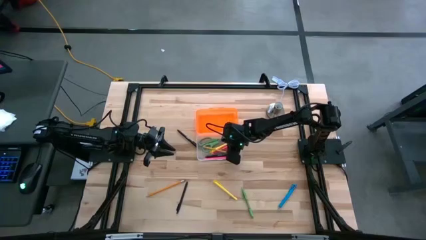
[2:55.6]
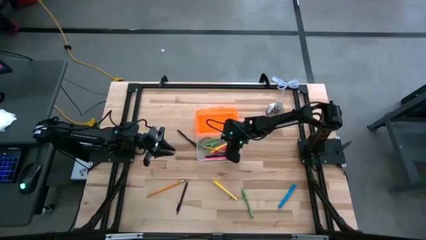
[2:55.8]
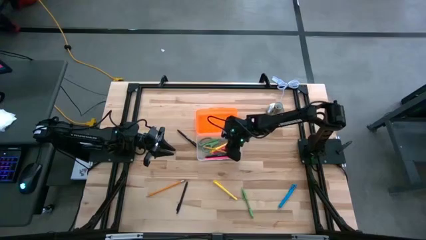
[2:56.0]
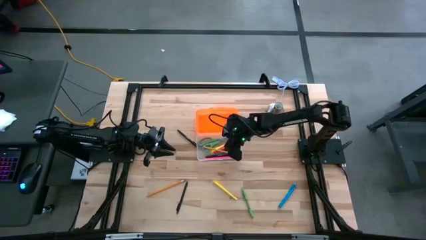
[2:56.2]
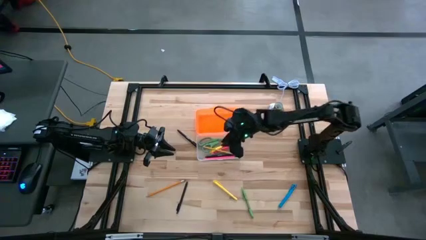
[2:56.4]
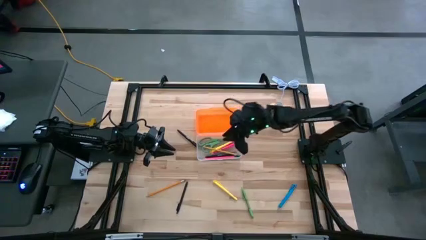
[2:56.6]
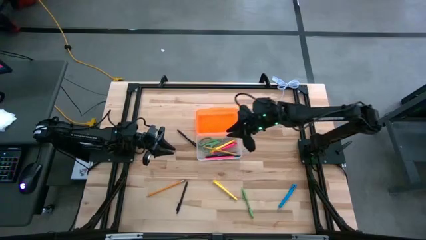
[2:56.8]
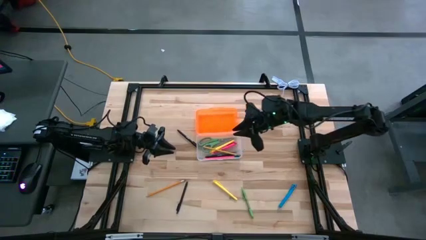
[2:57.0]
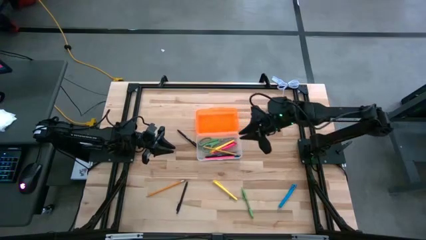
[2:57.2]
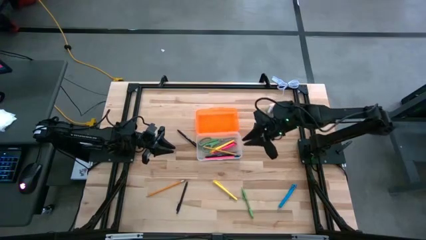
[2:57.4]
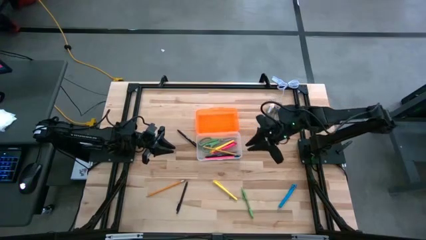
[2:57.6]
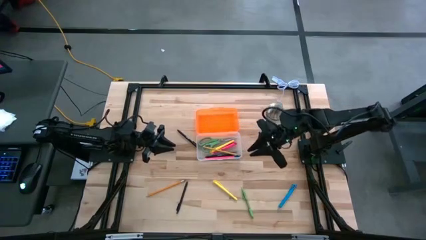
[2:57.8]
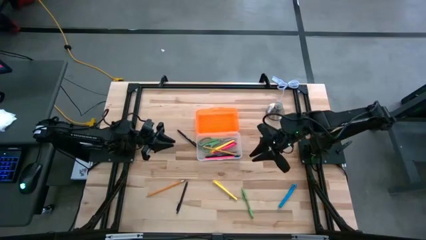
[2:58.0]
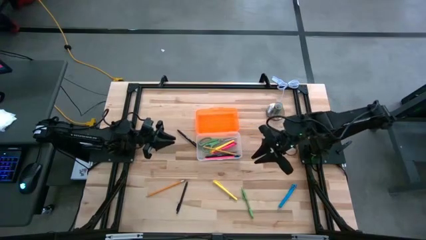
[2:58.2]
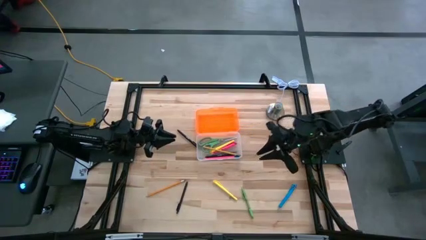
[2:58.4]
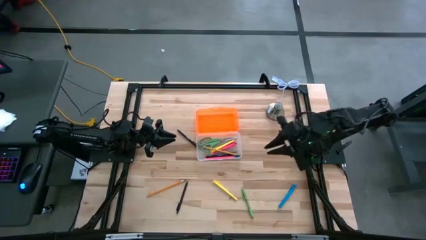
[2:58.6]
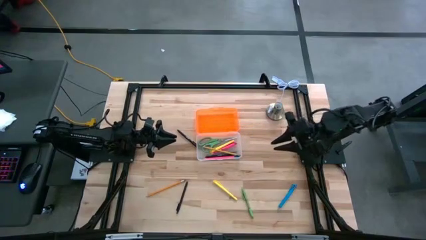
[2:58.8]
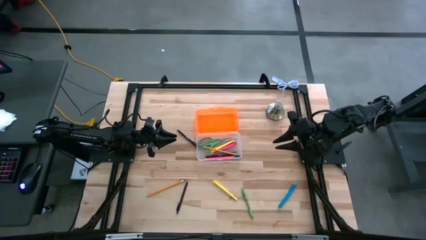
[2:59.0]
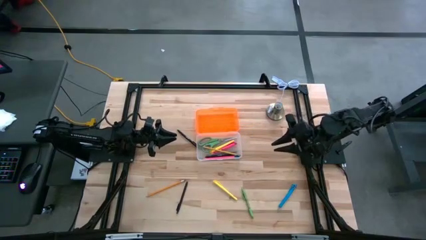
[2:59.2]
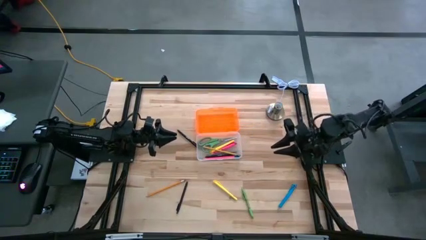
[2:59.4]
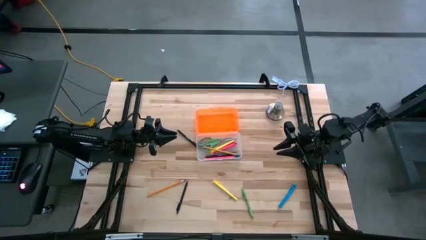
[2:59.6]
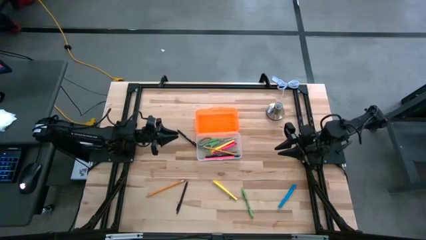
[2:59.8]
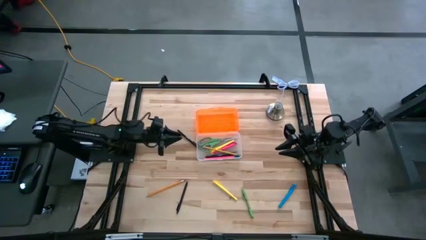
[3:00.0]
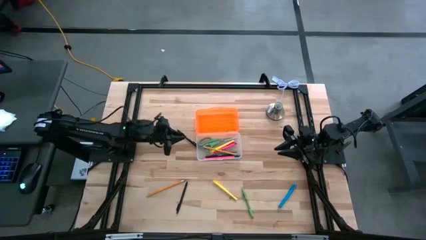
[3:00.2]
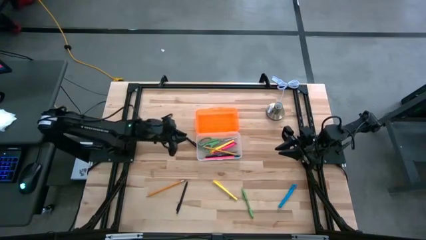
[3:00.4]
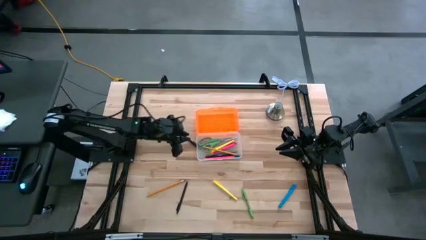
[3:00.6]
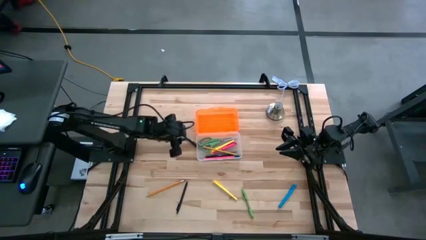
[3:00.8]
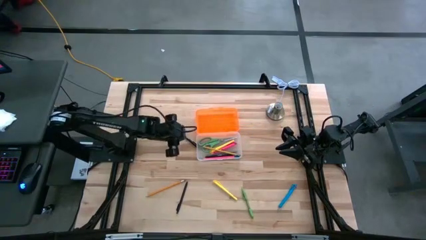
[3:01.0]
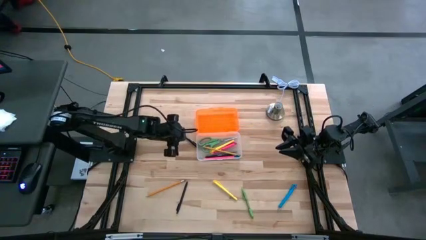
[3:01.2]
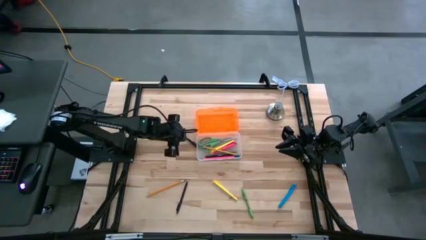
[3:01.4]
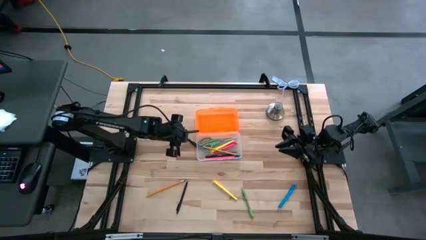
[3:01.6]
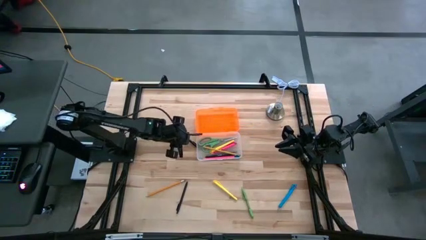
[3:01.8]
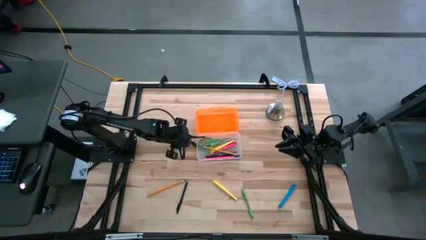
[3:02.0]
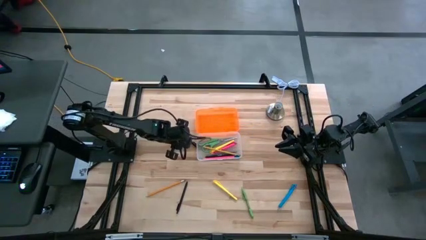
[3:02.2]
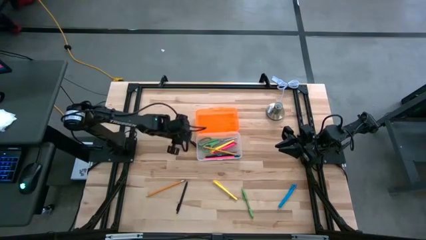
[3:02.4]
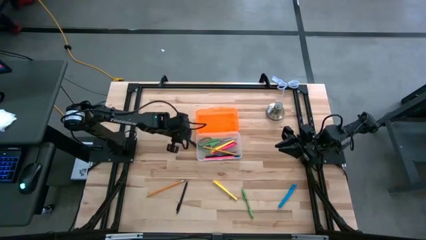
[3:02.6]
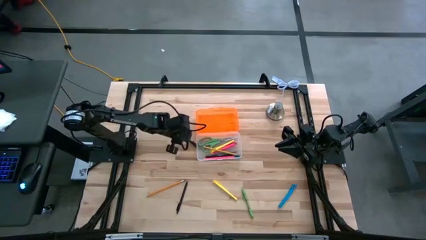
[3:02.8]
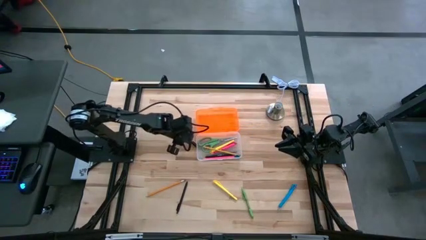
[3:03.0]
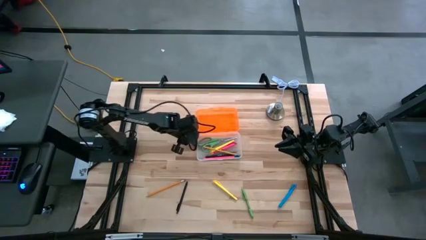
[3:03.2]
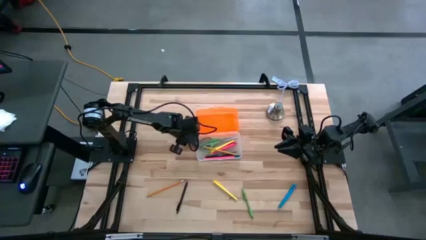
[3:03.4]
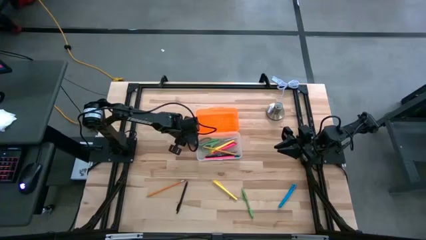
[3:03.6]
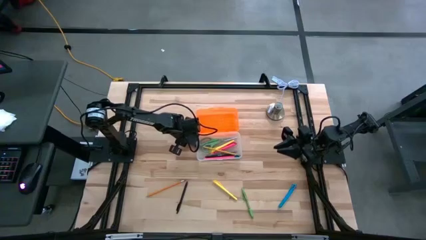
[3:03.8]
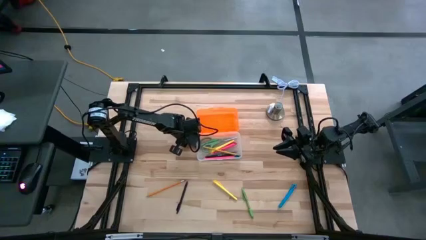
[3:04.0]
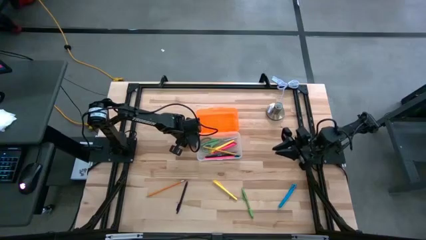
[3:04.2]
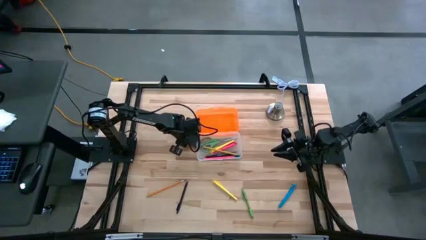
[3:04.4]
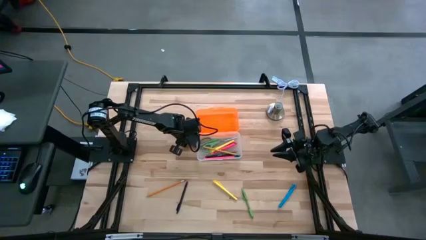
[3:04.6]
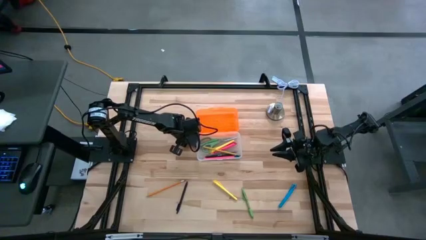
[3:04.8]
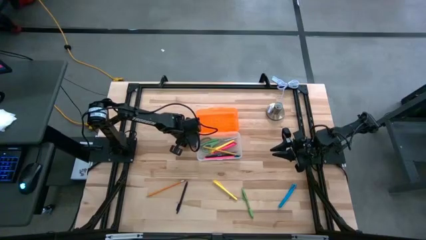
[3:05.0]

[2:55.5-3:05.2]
Task: Pick & place school supplies into a supply box
Put the black pen into the container

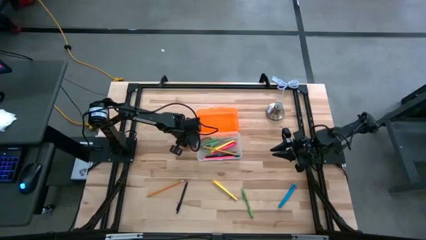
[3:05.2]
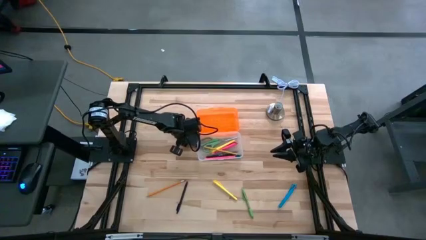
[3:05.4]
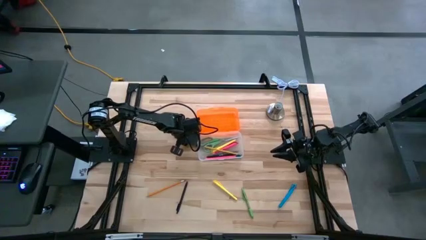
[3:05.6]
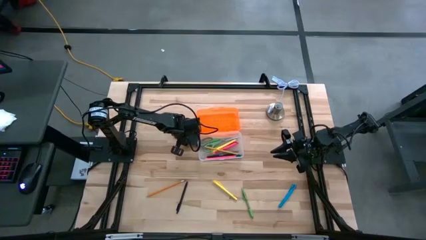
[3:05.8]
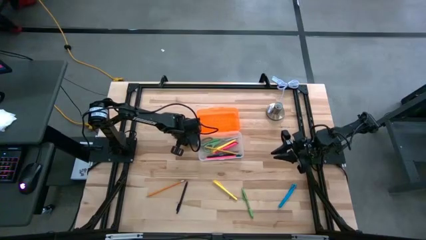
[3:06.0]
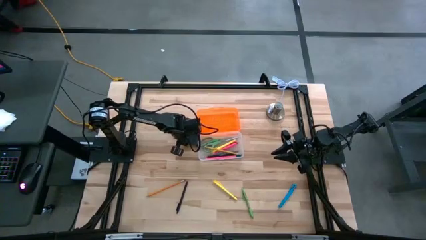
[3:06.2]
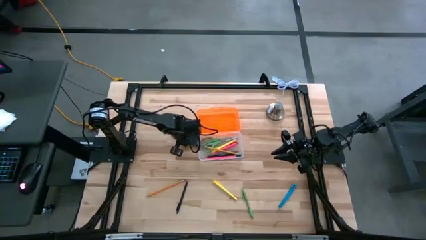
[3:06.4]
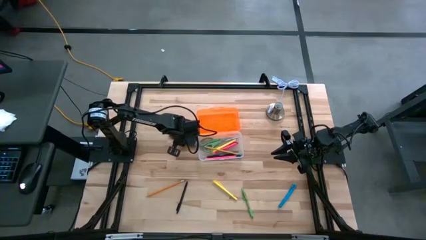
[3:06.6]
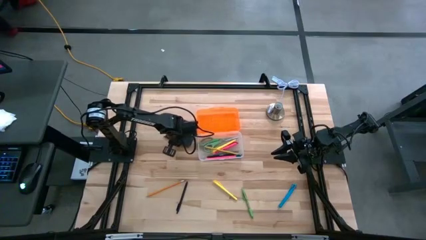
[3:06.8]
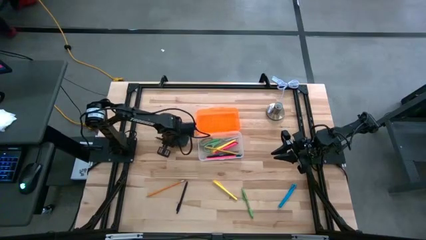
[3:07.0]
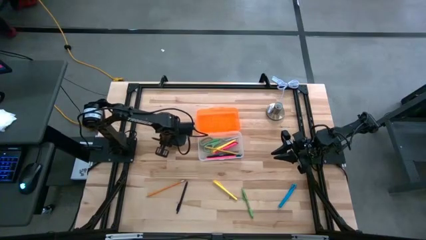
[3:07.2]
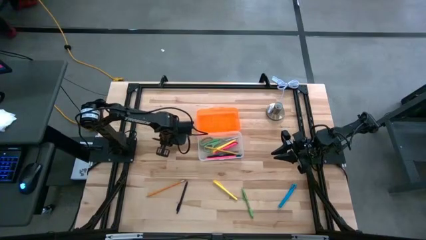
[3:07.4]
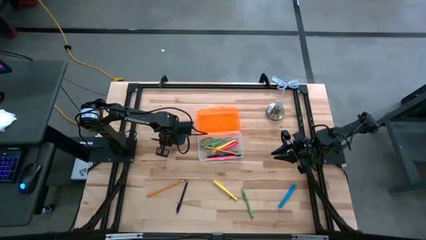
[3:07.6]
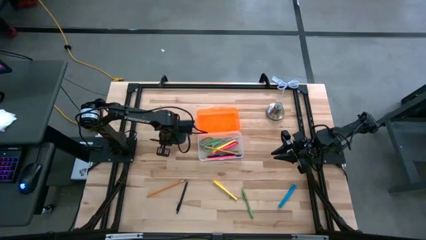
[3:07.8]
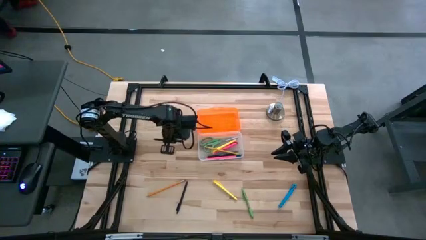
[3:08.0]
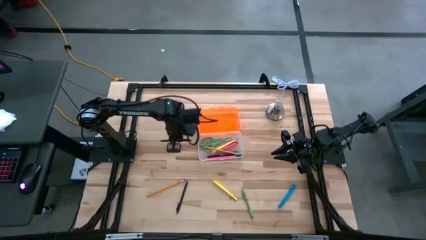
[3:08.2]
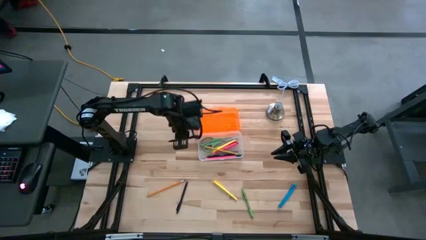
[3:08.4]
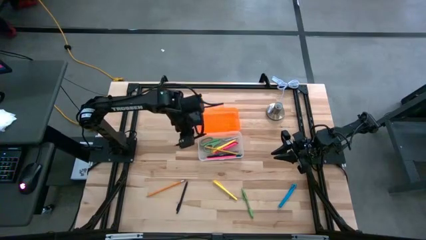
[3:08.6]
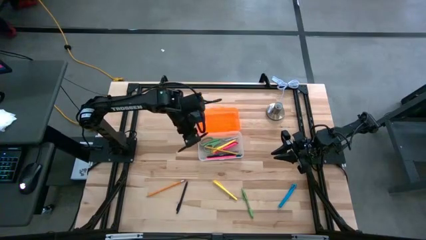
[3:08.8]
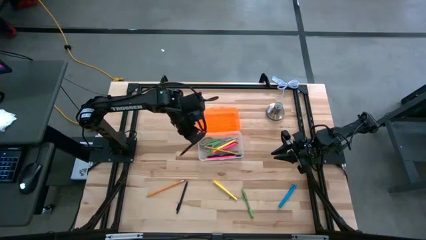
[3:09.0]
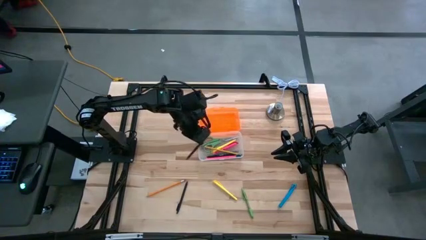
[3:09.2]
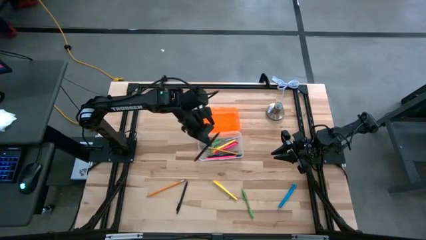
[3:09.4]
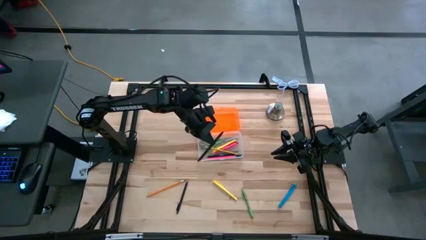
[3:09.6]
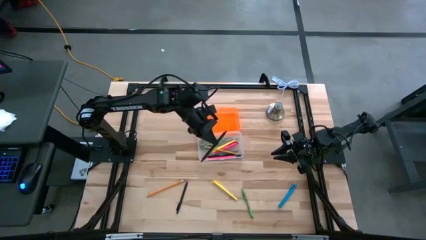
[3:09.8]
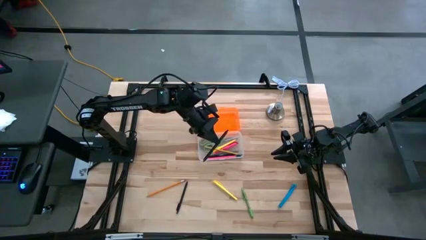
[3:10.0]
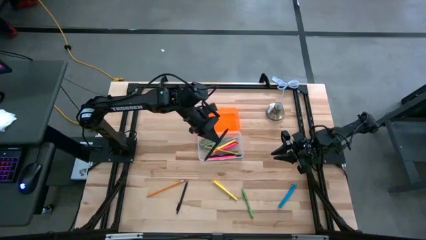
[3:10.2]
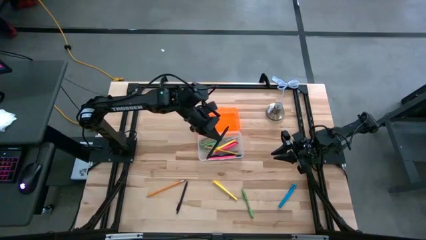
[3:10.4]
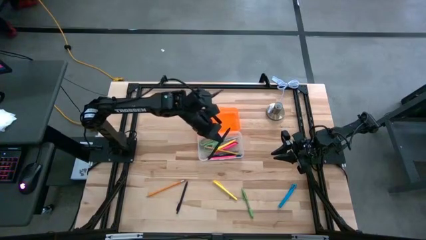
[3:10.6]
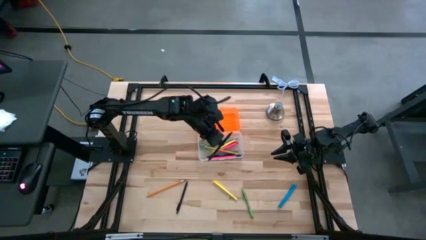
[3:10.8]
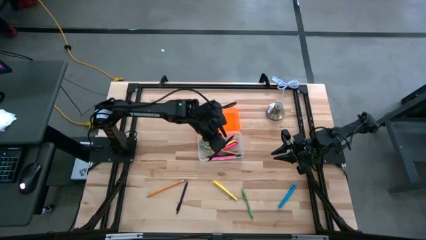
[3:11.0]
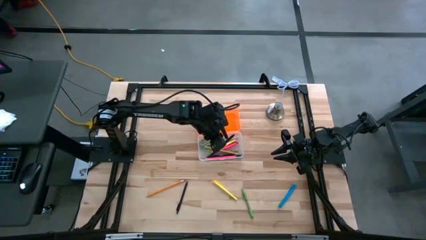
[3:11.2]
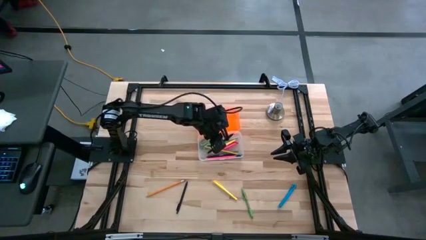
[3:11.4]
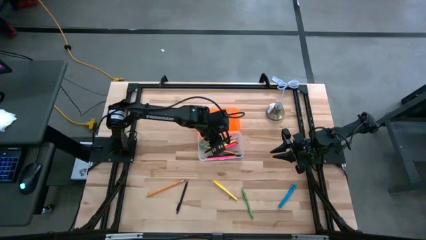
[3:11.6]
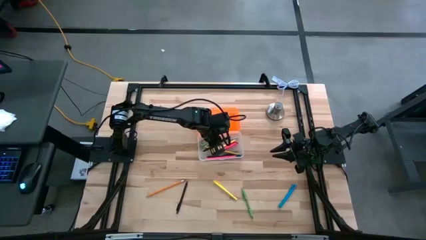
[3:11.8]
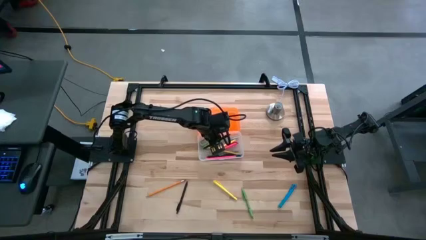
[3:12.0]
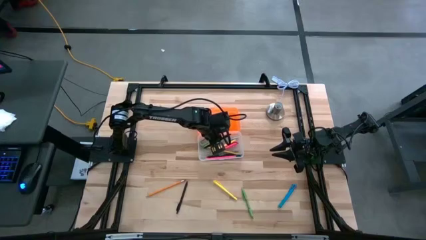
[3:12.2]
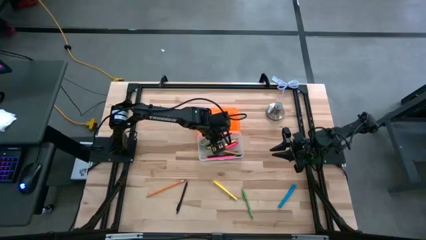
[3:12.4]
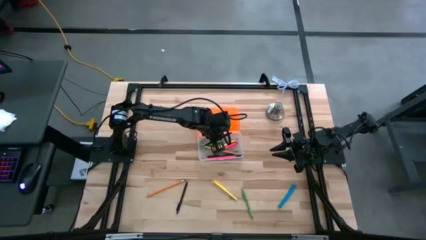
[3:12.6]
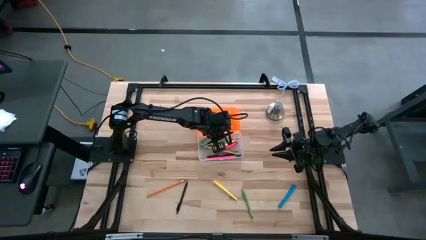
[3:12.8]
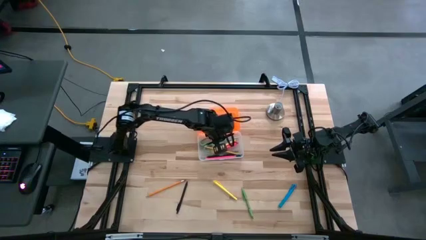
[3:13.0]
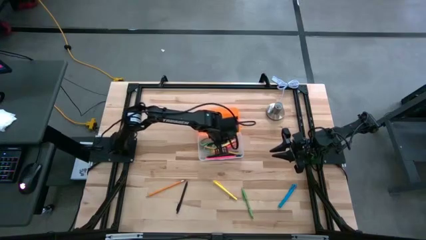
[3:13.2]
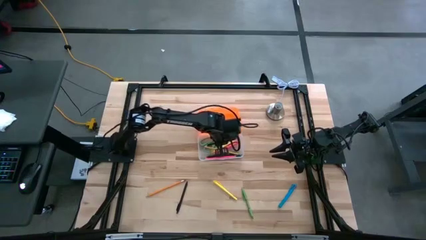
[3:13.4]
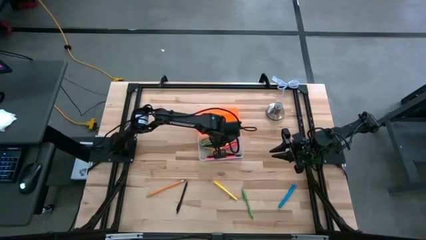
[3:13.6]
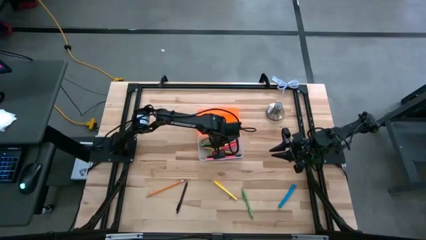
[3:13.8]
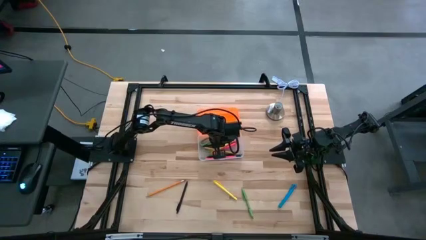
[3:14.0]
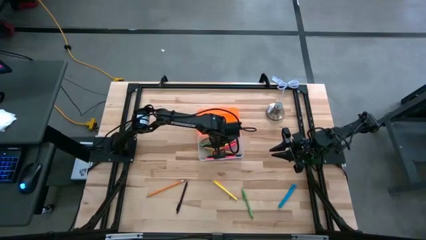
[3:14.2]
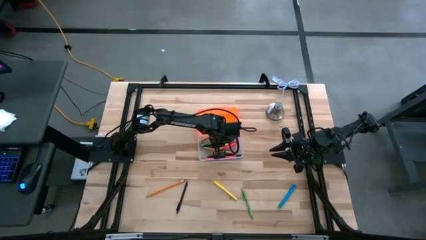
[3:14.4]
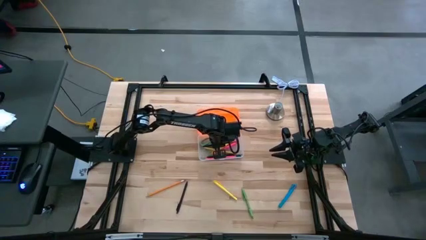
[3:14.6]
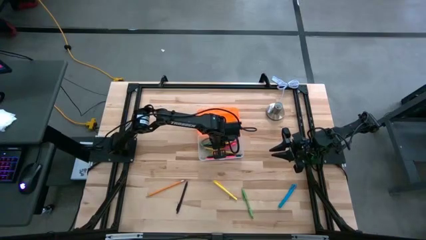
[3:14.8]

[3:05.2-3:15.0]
Put the black pen into the container
